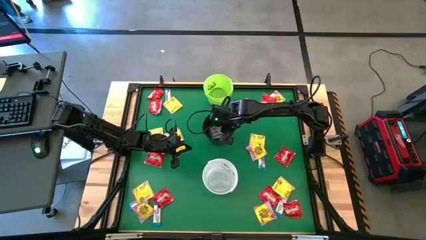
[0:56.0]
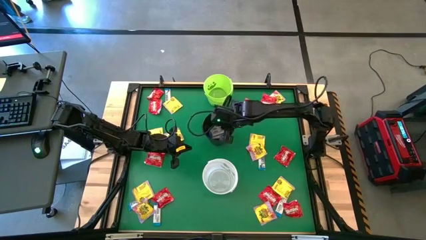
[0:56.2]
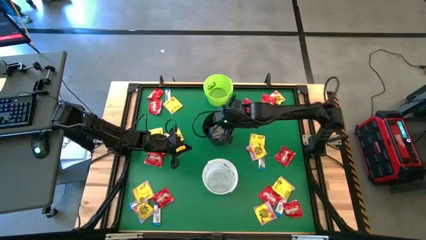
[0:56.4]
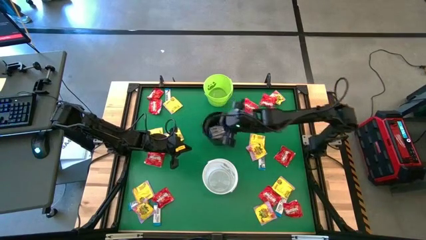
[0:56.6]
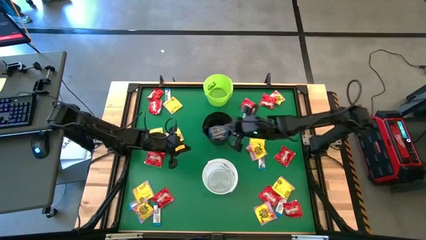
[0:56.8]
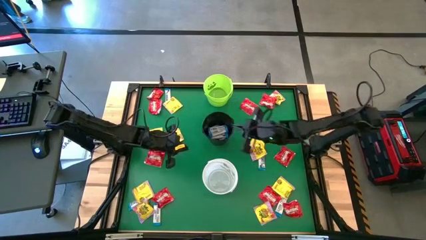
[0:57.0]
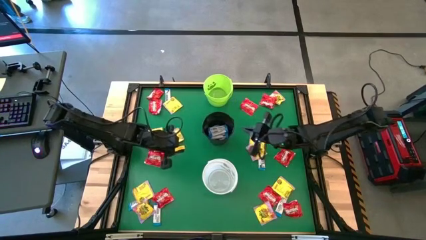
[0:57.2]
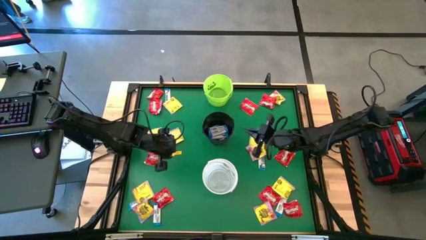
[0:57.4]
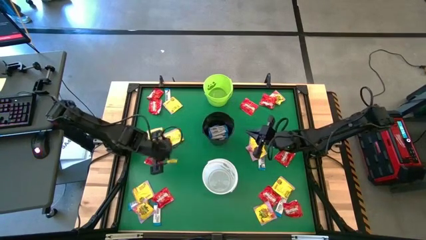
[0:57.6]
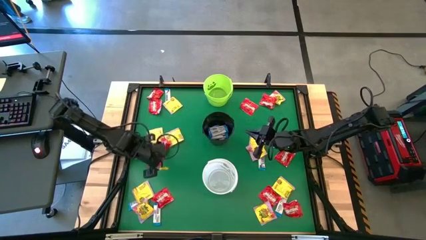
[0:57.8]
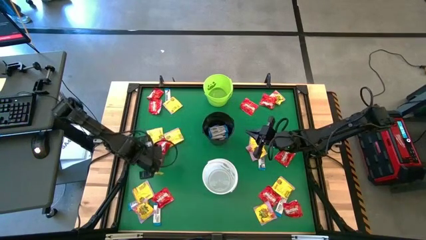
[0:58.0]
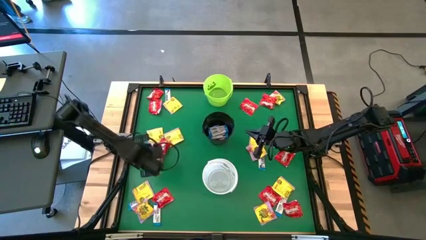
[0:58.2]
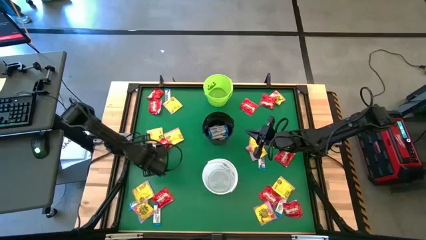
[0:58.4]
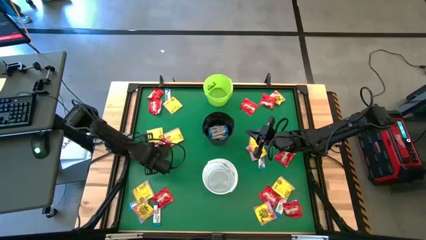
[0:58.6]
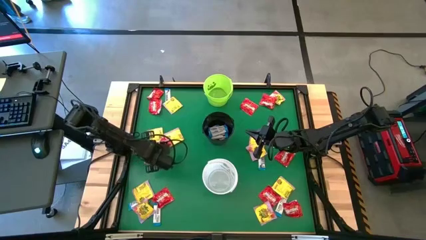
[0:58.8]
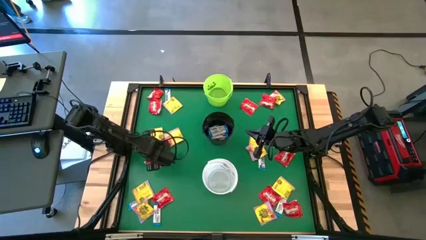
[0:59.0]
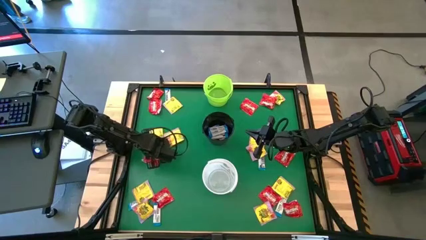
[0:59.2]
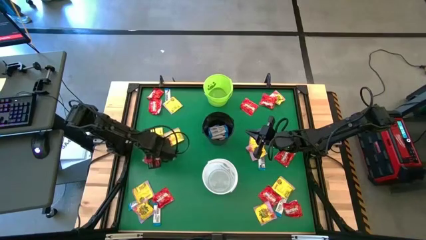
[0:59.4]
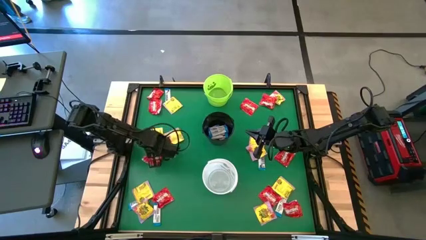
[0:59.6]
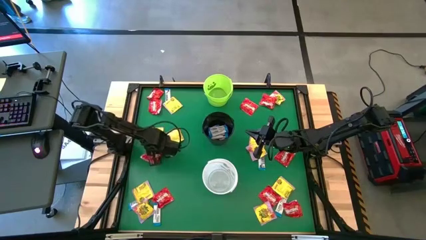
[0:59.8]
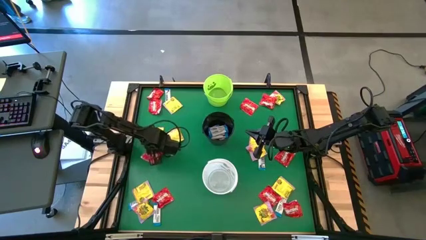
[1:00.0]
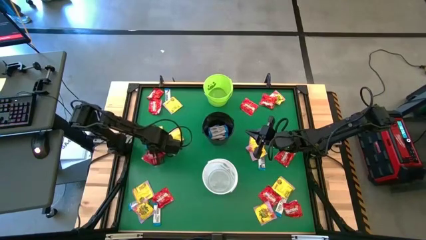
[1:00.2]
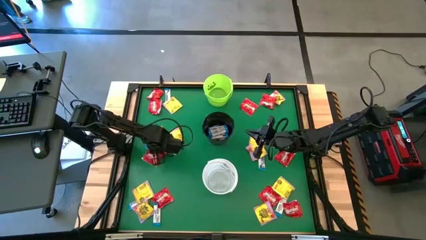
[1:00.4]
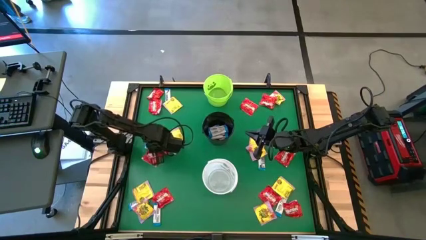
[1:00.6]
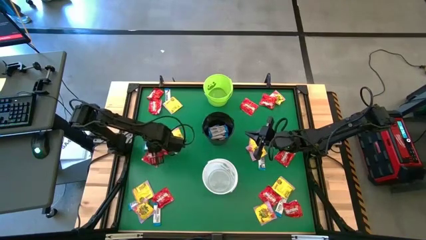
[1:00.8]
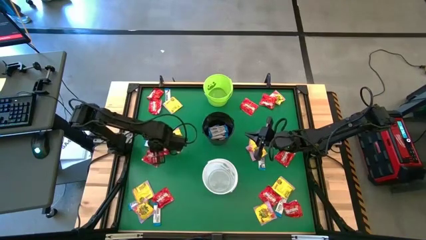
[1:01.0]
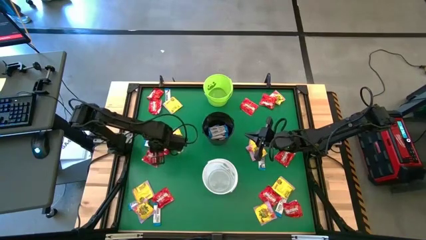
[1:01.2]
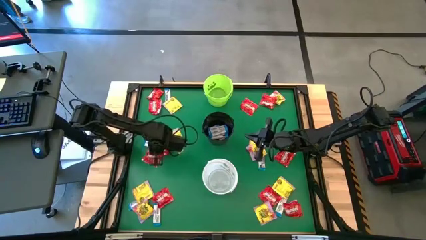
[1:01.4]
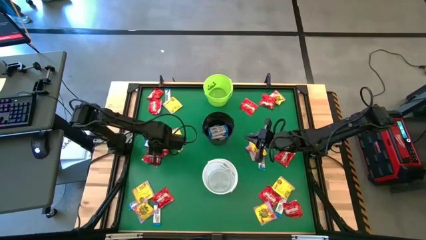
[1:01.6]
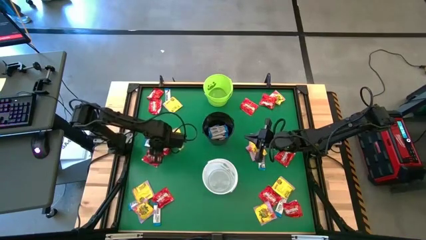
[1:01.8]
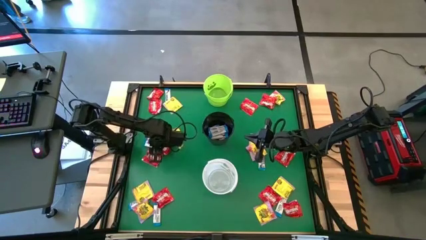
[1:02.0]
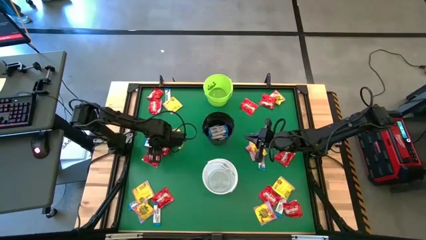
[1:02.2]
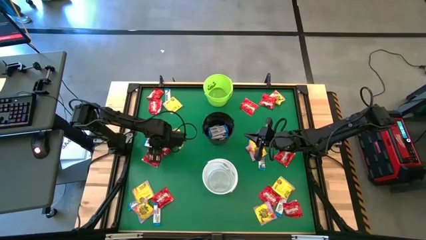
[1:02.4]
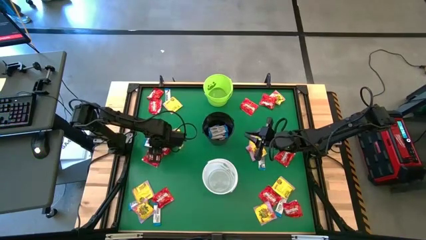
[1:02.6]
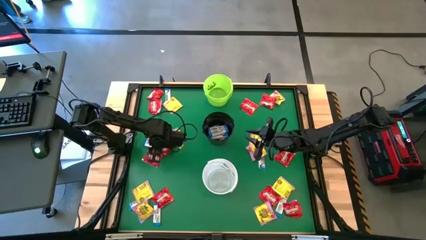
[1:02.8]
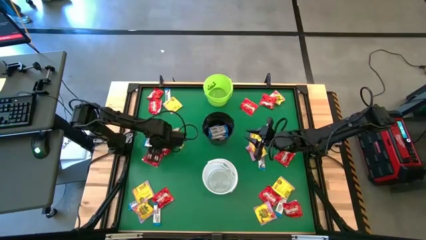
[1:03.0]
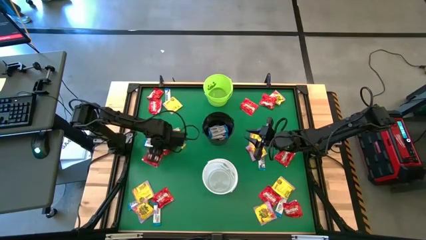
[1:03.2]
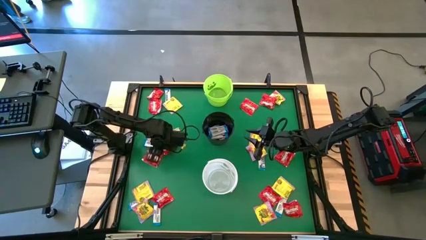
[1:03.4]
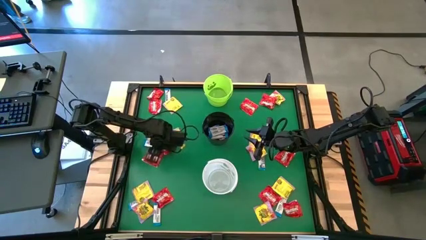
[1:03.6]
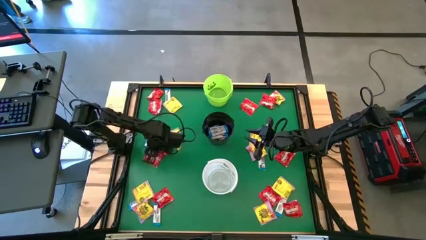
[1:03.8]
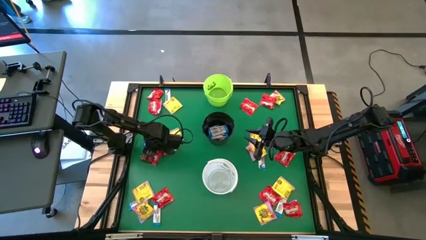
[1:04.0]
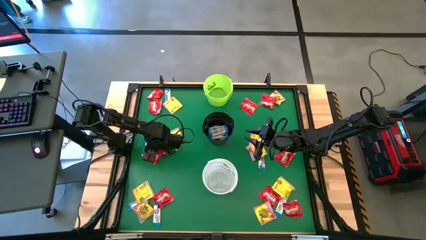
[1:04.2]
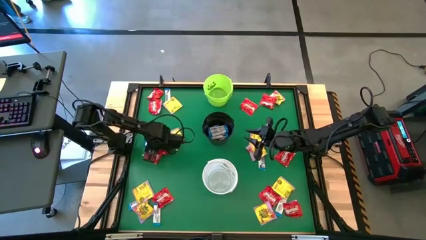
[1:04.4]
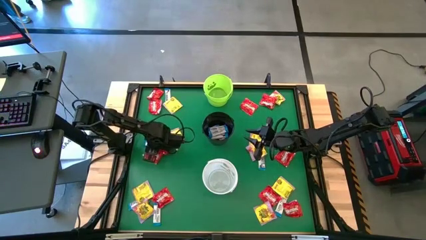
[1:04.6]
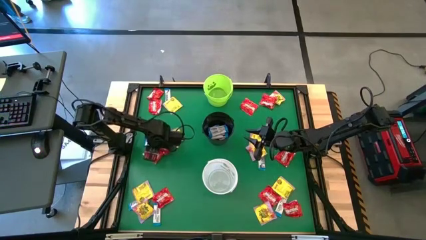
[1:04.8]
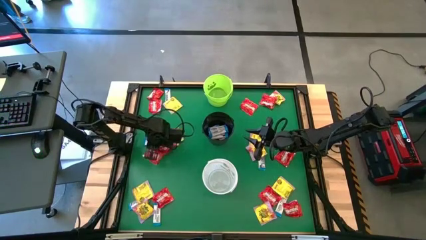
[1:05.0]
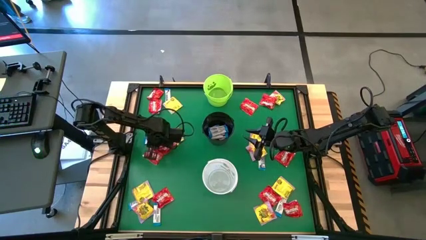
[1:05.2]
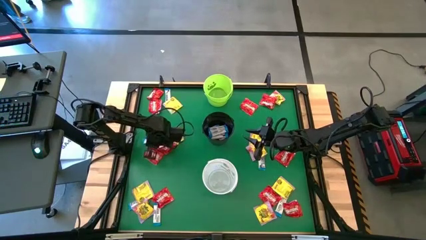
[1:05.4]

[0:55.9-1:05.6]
Task: Sort candy by brand, put in halloween buckets
Put the white chocolate into the black bucket

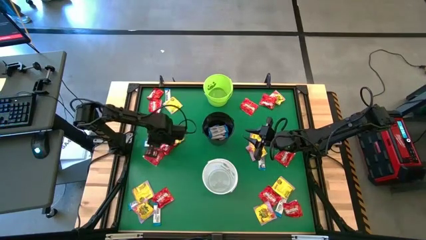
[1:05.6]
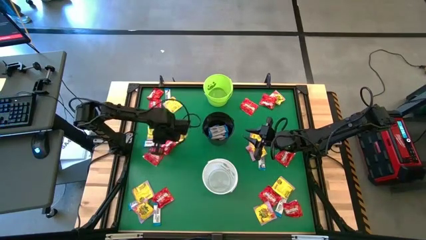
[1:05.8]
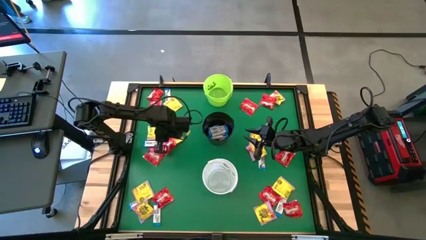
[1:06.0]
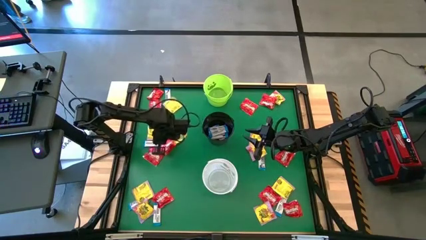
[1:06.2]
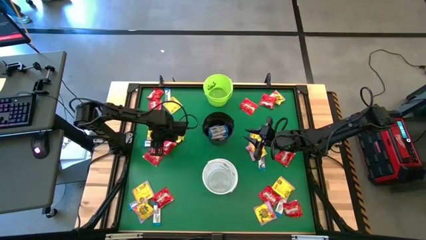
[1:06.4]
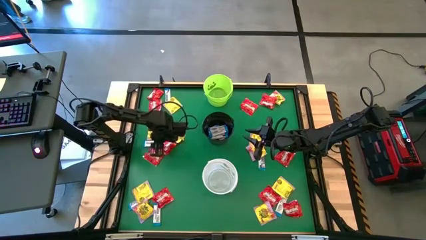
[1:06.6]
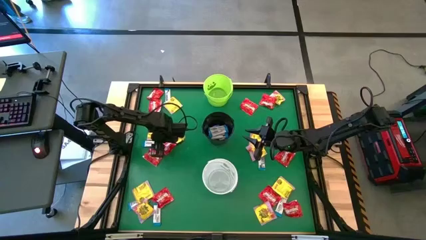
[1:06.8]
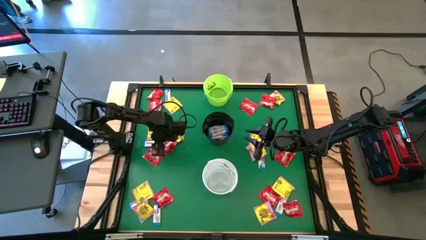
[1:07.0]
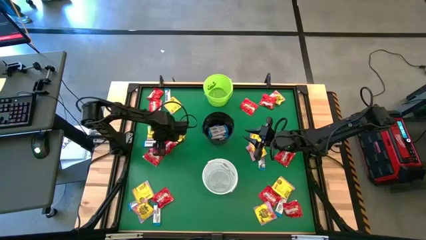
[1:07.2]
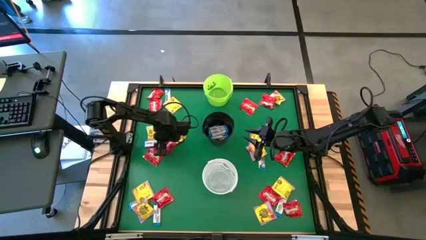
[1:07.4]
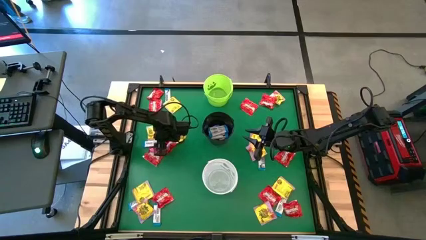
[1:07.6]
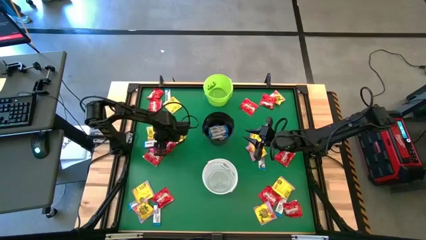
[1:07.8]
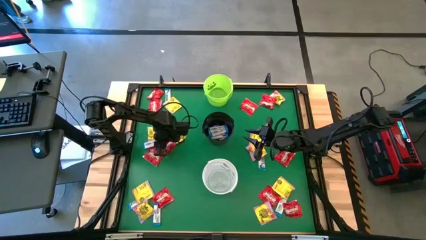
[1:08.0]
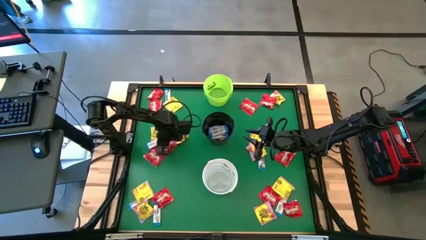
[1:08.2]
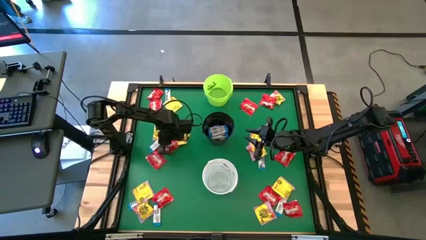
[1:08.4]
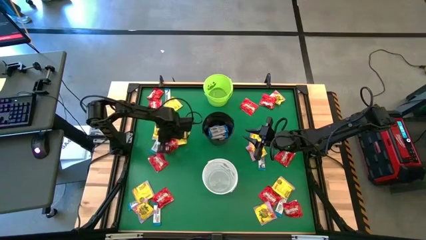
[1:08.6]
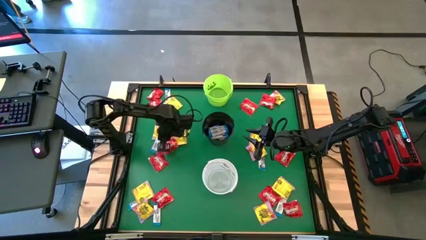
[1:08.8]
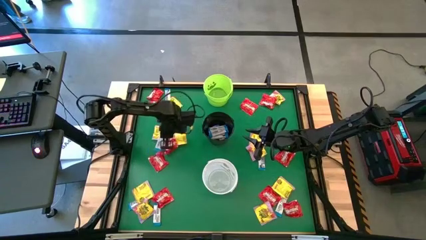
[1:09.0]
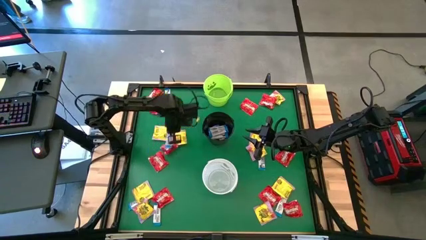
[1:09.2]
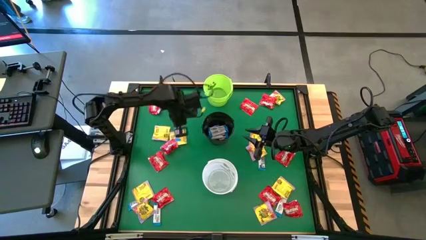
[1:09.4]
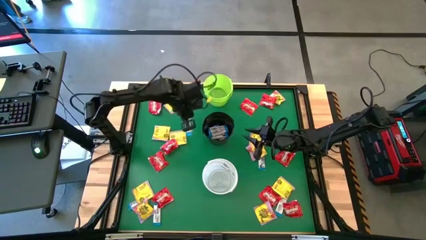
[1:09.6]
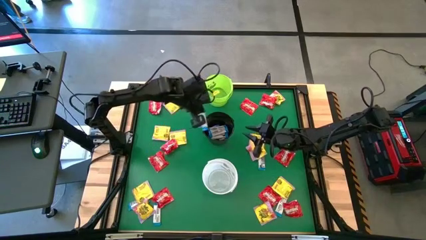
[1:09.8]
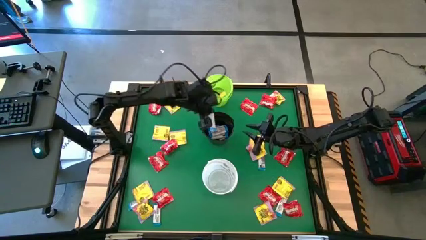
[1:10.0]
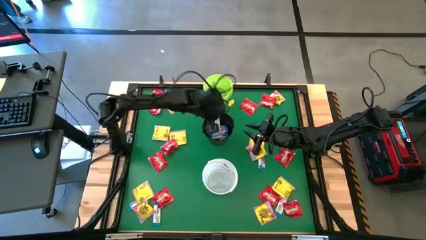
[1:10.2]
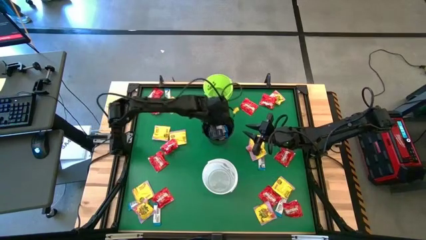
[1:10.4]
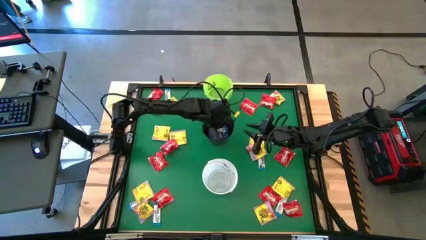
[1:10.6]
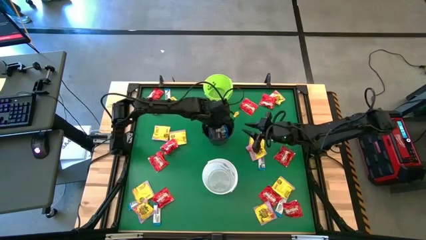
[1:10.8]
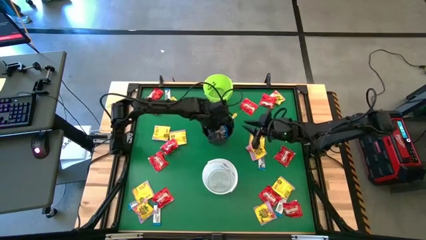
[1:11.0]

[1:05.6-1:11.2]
Put the white chocolate into the black bucket

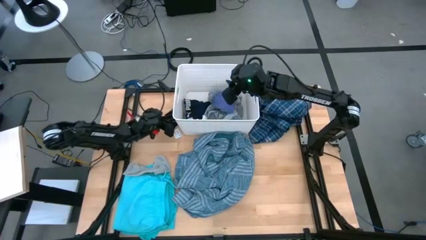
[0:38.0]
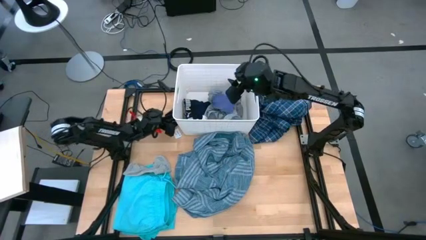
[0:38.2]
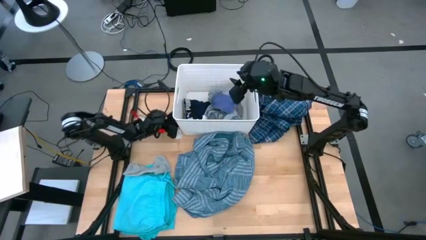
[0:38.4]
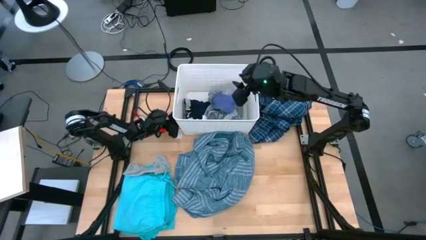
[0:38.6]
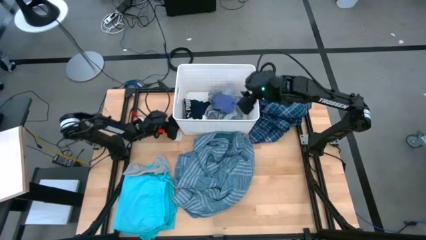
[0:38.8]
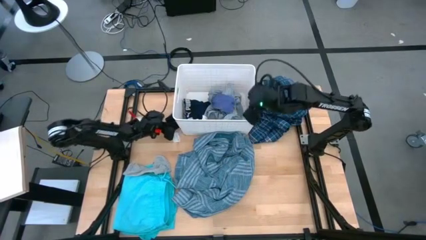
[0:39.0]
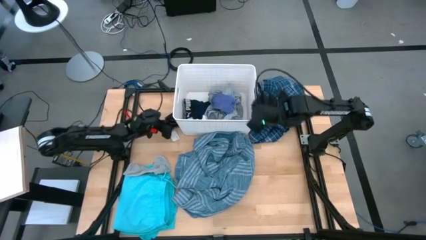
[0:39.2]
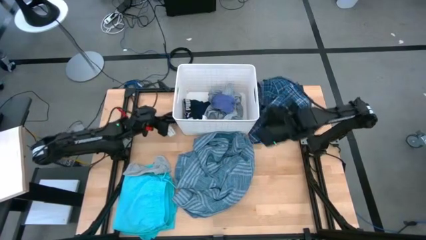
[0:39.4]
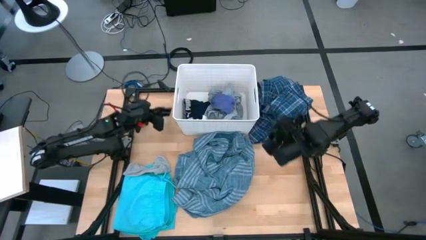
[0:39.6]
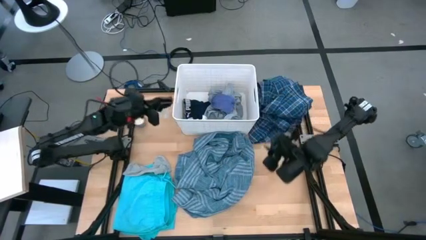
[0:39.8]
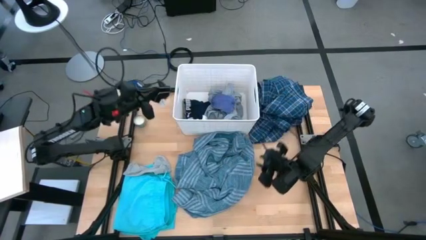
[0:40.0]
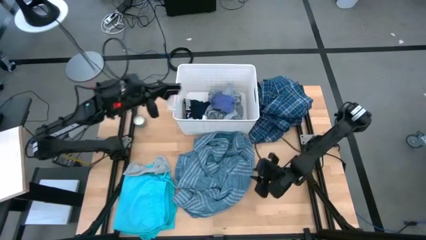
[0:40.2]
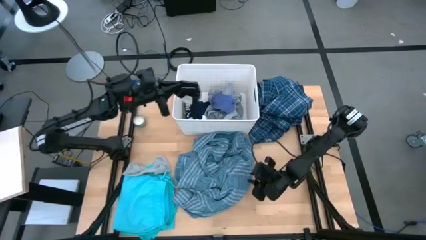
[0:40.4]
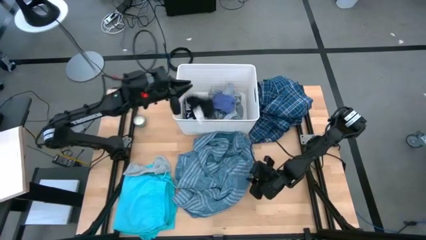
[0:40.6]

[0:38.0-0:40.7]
Task: Sort clothes
Put the black sock into the white laundry bin
